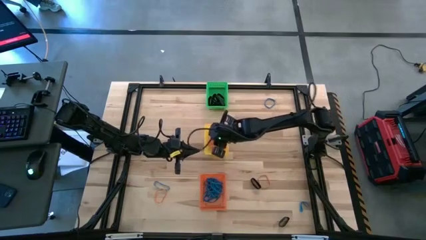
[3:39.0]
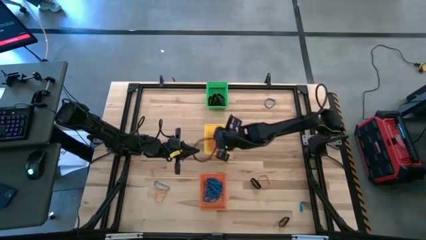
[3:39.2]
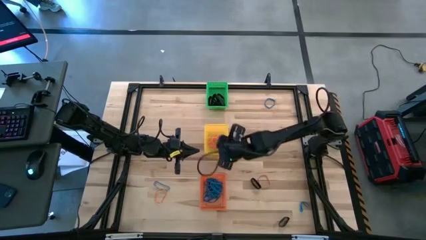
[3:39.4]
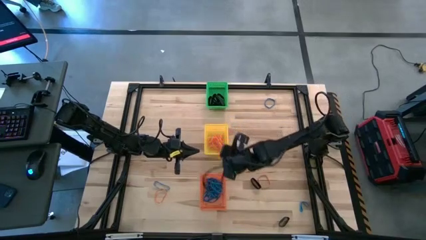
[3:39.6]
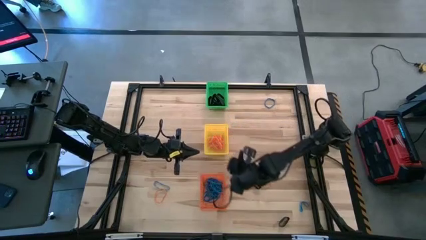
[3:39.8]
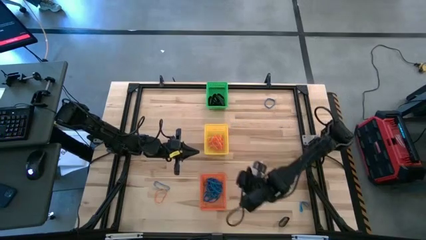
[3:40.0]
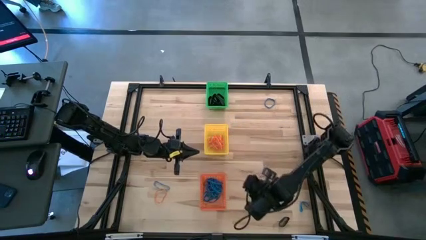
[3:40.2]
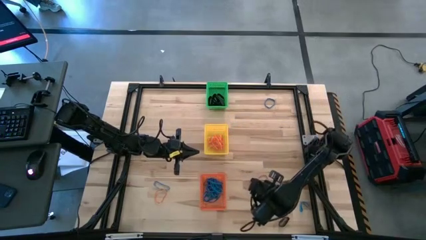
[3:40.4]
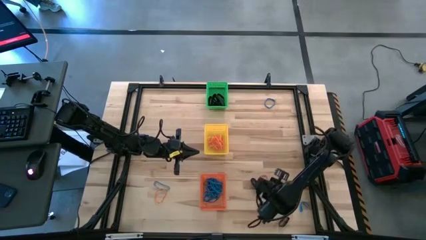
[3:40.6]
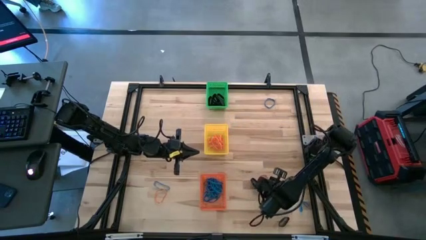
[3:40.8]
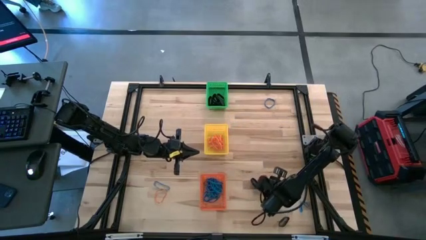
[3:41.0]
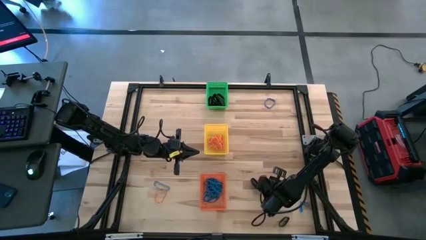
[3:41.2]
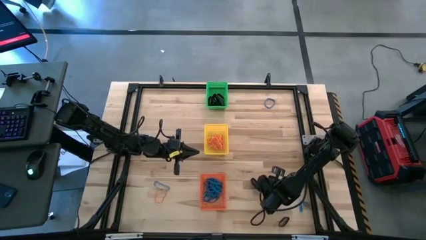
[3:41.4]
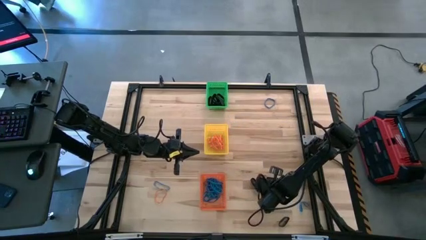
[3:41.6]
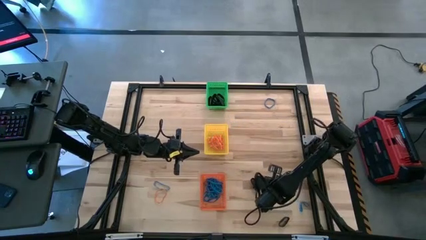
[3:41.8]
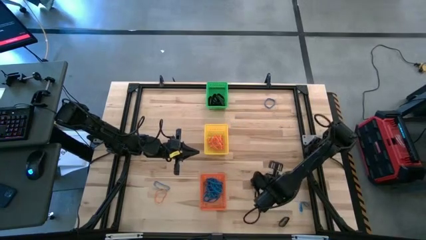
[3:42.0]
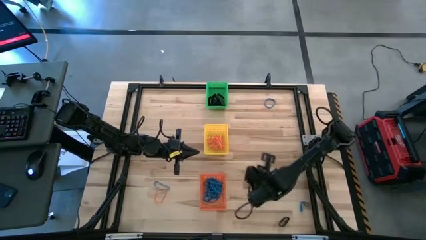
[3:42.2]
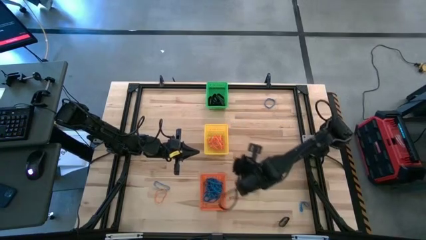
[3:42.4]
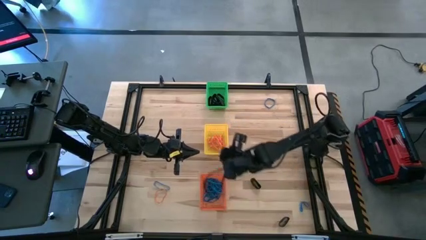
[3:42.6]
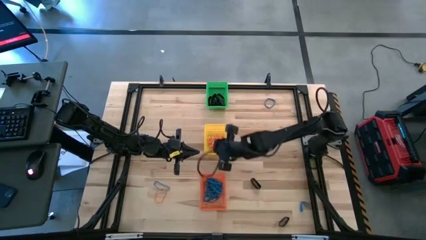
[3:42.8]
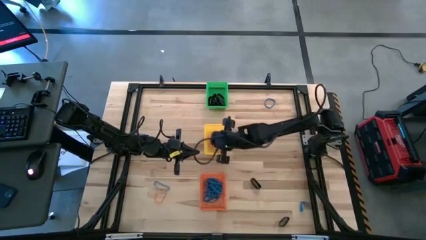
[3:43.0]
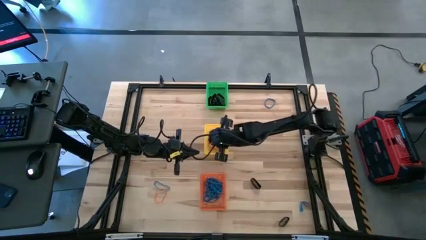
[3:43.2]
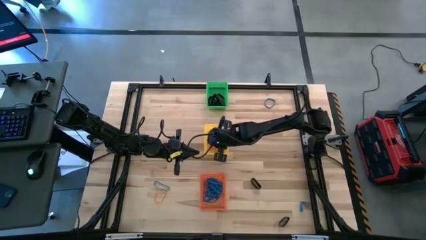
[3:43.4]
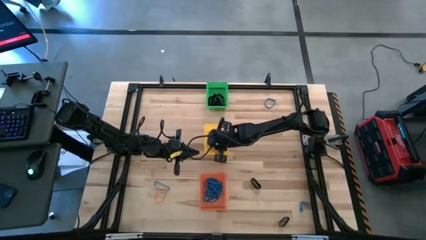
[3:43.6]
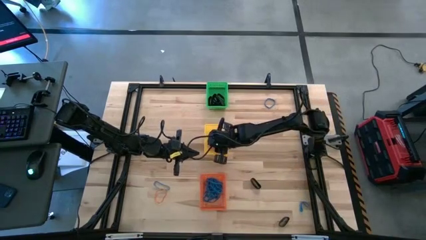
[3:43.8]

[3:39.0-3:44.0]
Task: Sort rubber bands into baskets
Put the orange rubber band into the yellow bin

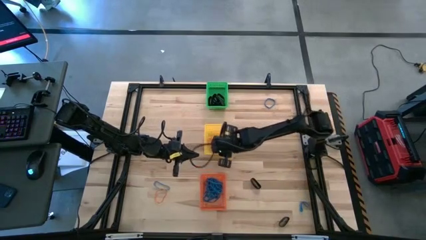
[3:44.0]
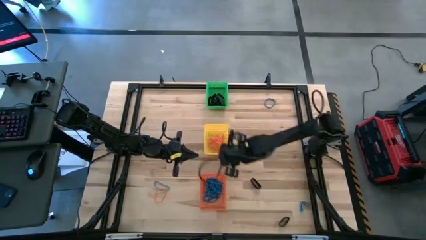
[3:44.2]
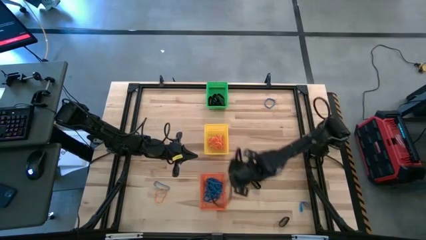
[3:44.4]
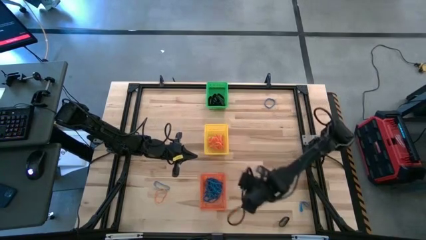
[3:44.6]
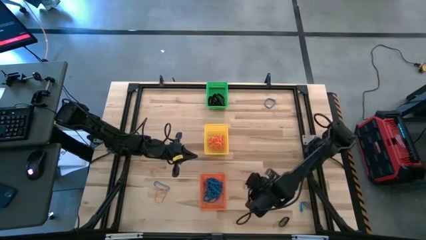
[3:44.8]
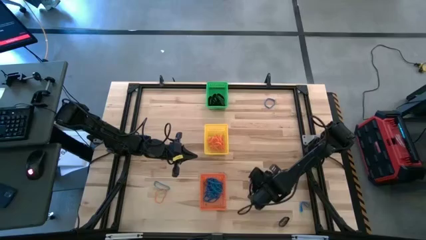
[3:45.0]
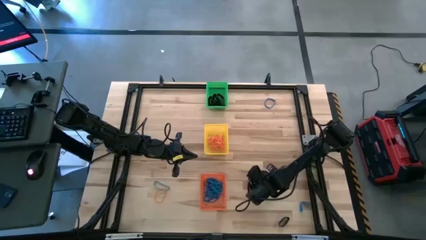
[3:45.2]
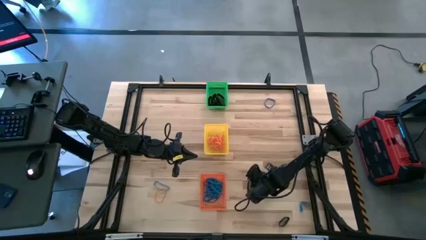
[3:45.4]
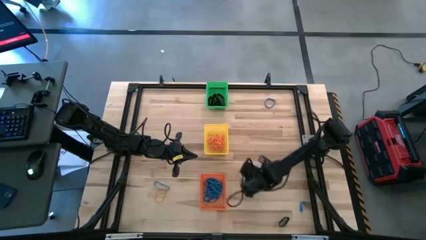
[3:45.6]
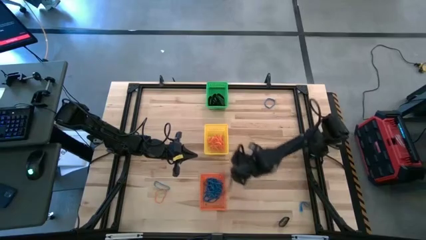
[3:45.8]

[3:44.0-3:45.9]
Put the black rubber band into the green bin

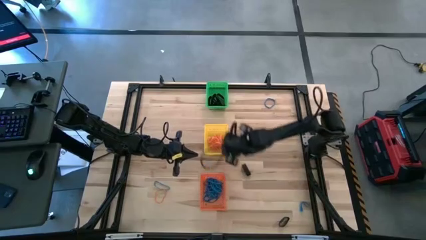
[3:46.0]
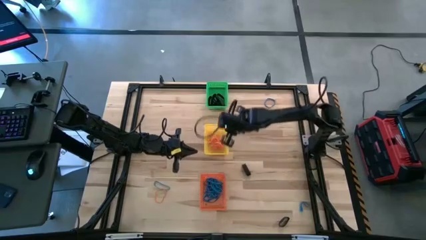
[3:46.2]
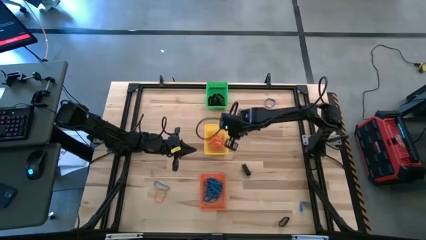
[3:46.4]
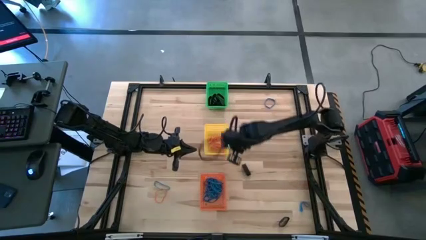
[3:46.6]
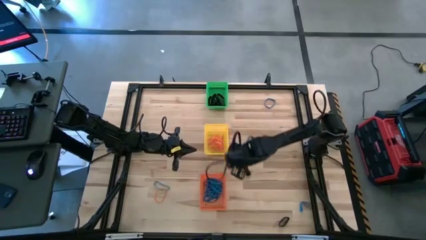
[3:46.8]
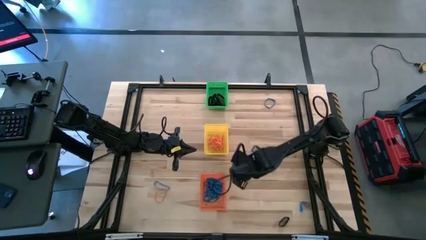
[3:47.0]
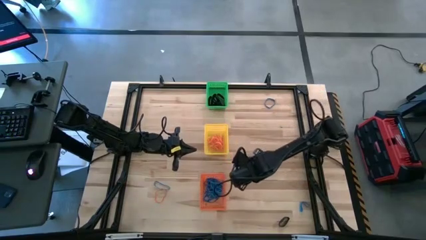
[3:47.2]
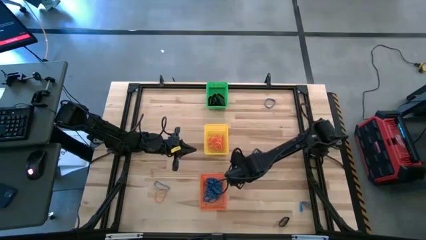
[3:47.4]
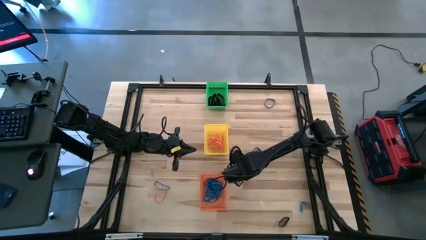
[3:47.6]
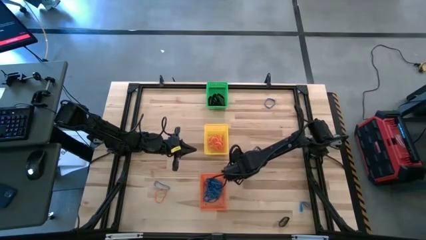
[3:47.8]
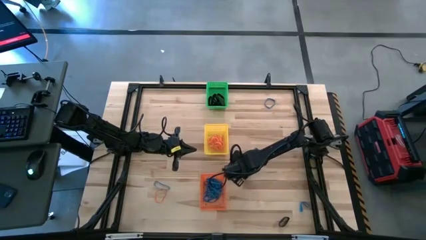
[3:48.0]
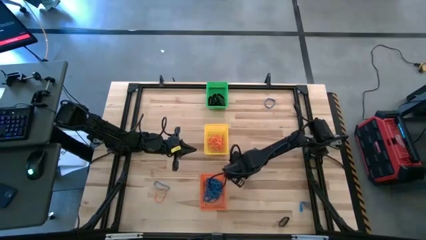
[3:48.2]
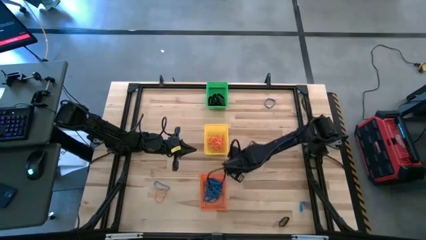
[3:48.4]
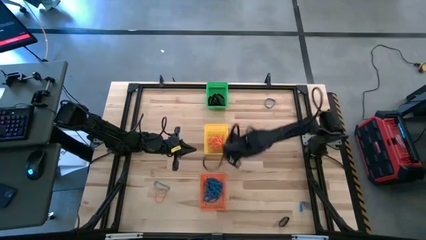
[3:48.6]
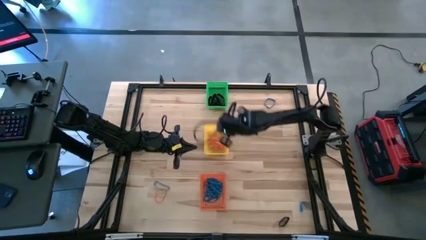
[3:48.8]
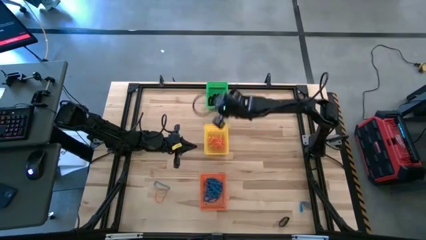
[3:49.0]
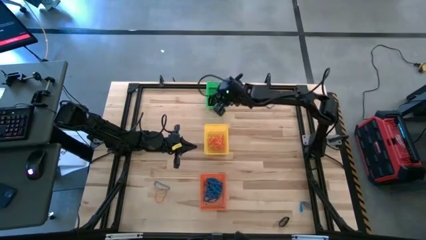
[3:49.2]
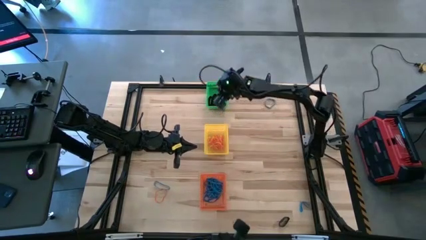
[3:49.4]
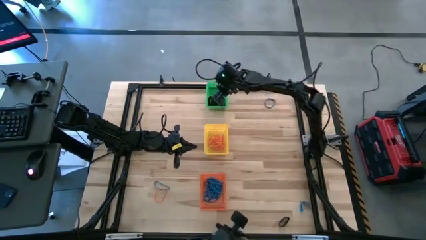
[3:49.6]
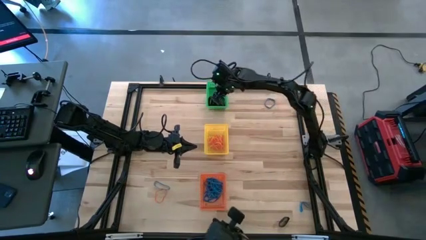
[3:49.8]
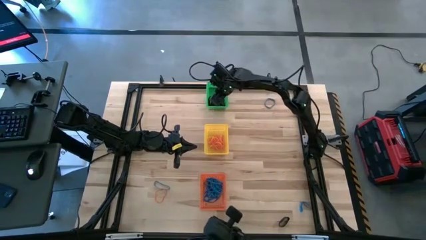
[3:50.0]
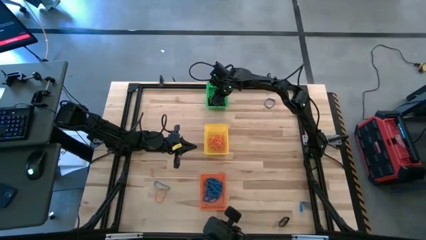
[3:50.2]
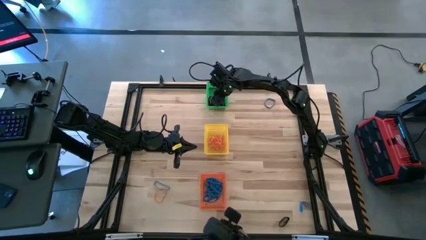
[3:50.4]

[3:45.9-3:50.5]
Put the black rubber band into the green bin

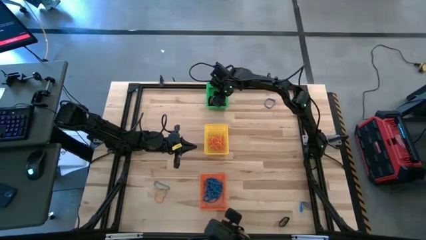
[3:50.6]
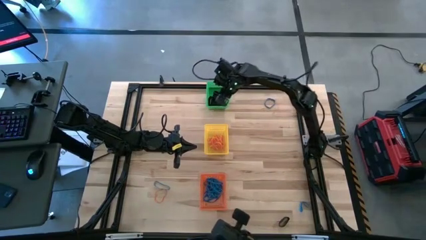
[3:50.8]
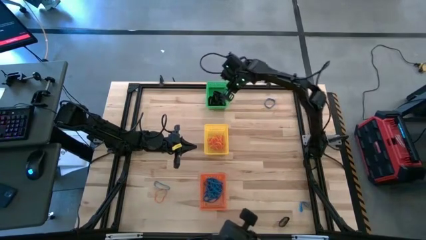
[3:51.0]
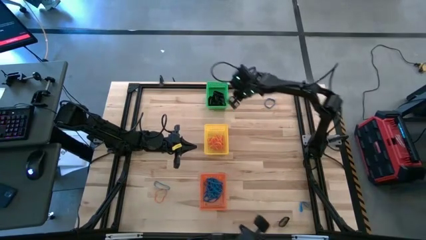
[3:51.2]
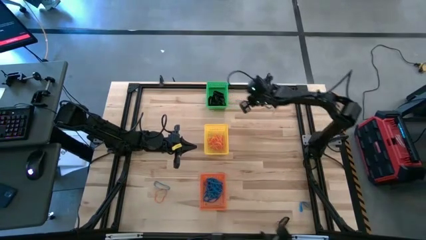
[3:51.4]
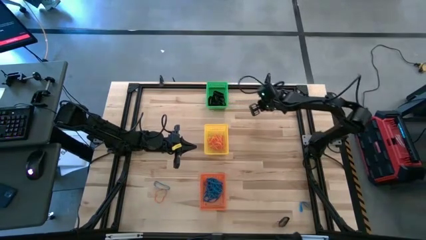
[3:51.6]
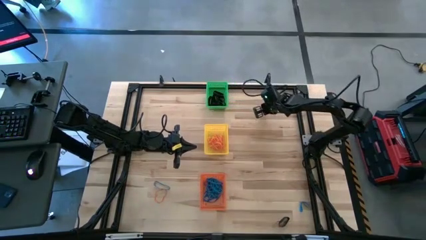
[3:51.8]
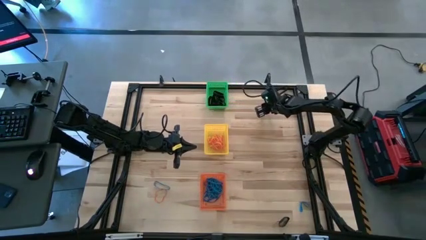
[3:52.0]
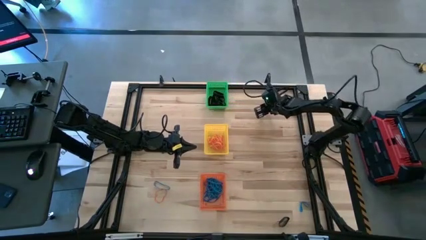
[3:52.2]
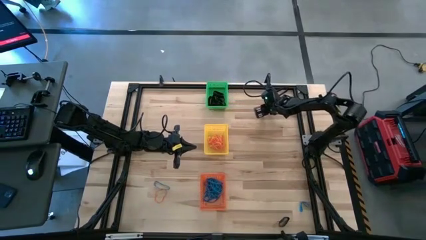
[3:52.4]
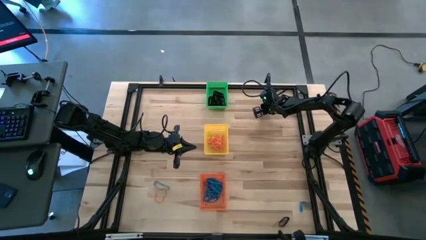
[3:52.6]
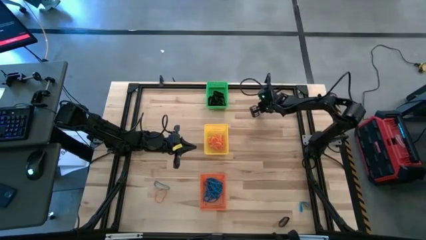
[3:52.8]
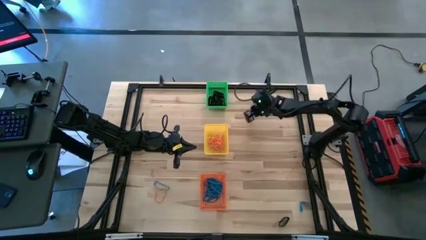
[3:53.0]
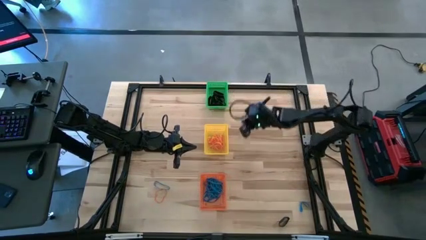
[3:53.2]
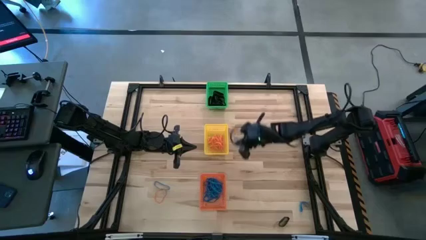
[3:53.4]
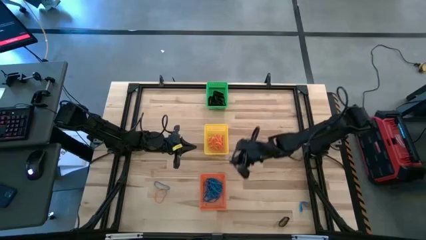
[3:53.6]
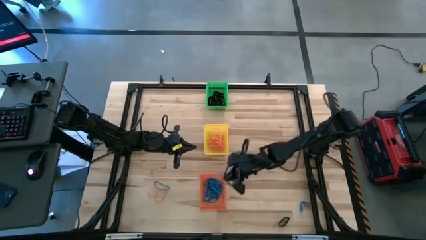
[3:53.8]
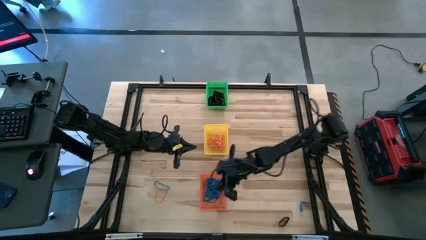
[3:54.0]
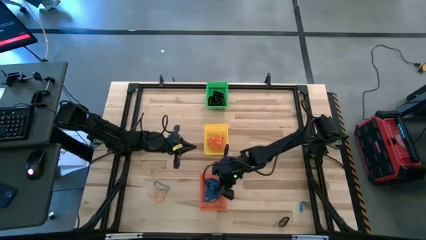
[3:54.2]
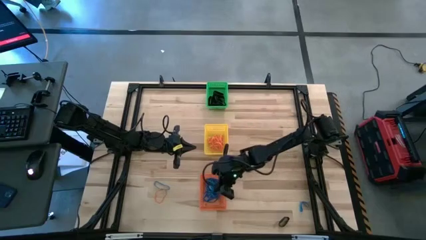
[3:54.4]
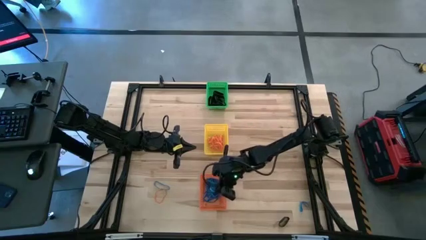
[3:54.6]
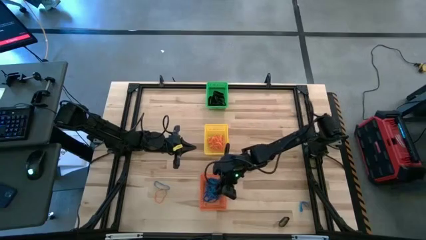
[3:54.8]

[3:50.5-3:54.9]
Put the blue rubber band into the orange bin
